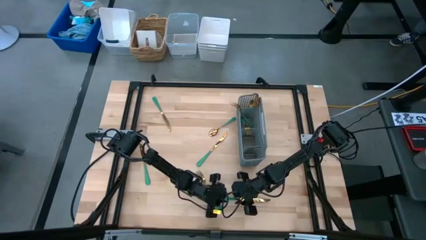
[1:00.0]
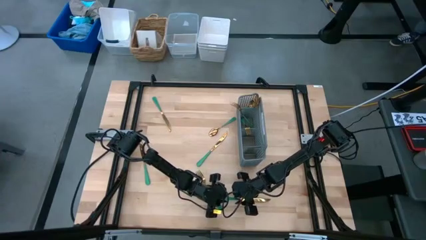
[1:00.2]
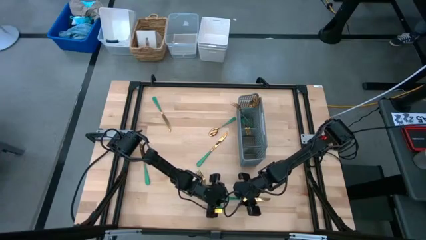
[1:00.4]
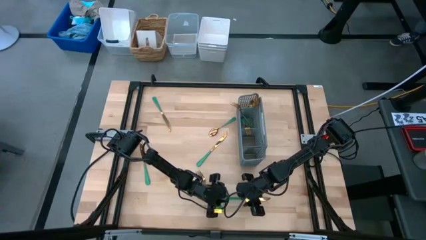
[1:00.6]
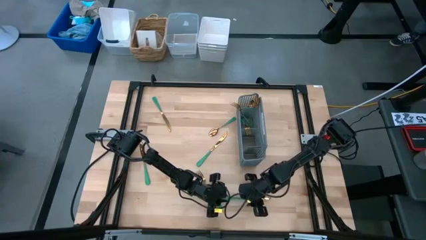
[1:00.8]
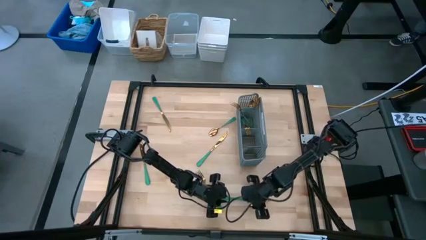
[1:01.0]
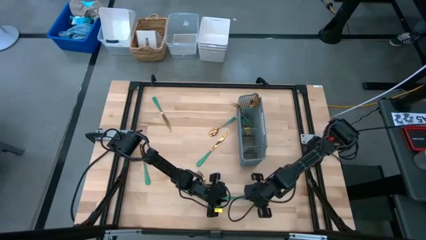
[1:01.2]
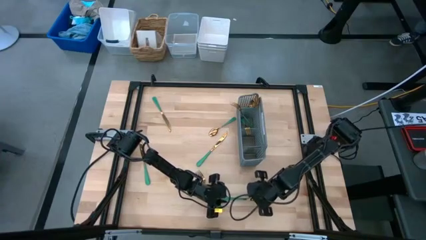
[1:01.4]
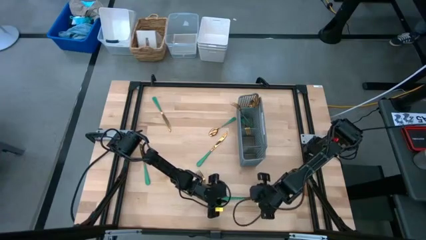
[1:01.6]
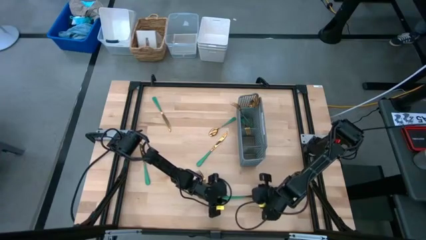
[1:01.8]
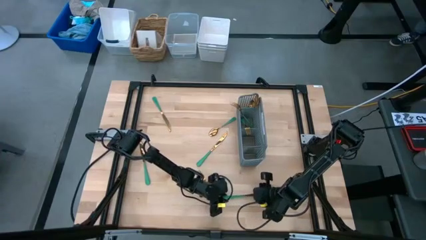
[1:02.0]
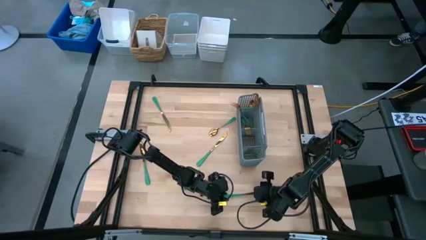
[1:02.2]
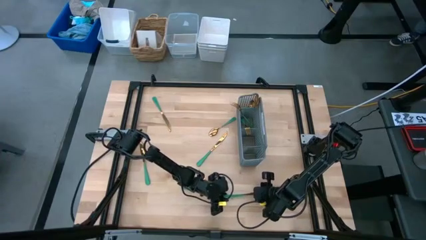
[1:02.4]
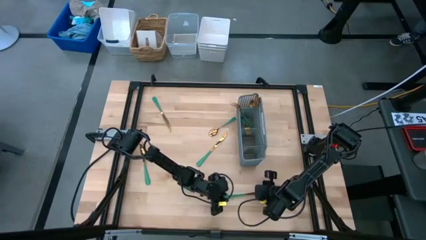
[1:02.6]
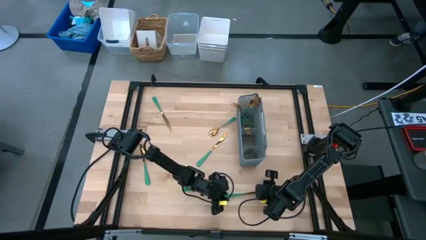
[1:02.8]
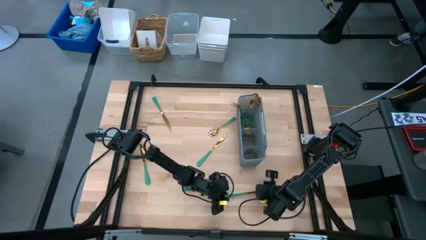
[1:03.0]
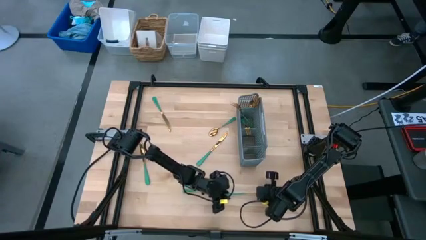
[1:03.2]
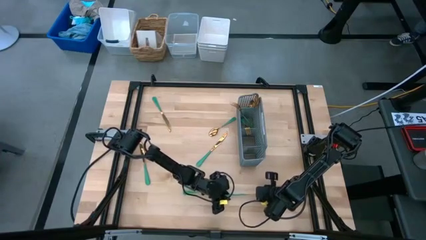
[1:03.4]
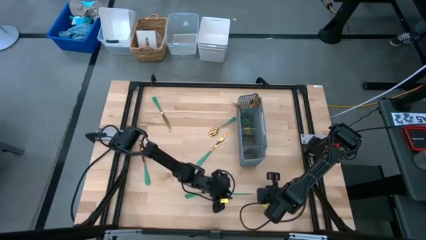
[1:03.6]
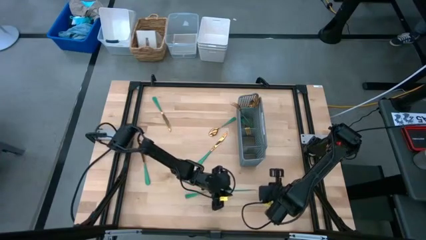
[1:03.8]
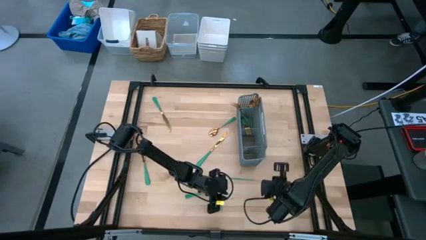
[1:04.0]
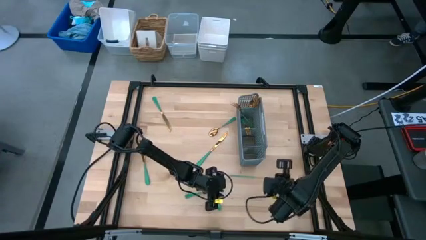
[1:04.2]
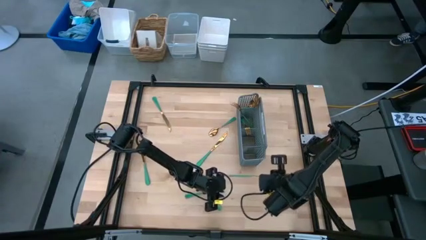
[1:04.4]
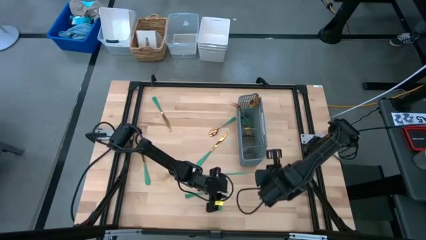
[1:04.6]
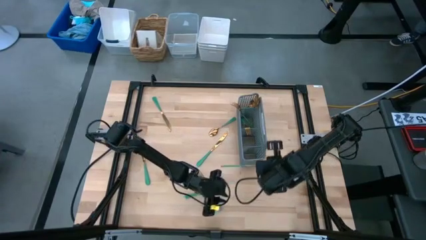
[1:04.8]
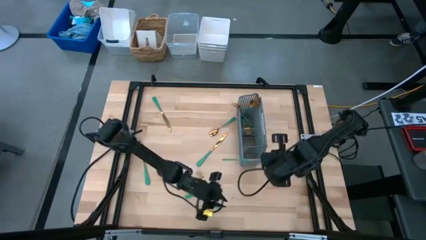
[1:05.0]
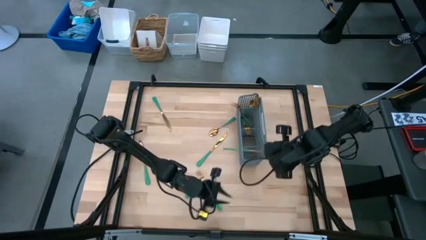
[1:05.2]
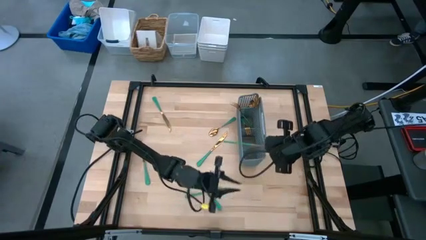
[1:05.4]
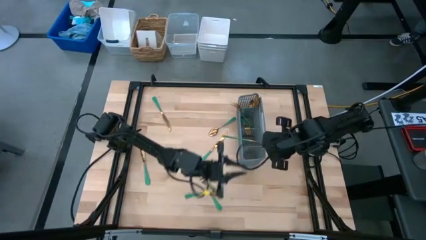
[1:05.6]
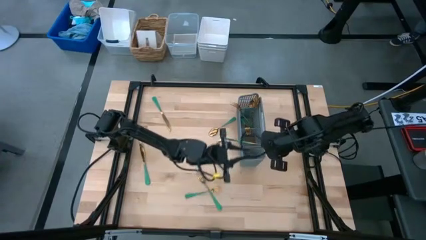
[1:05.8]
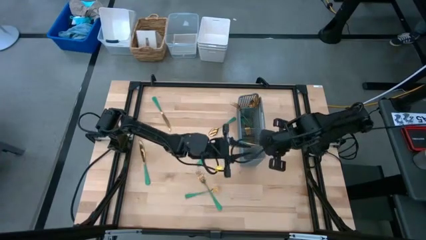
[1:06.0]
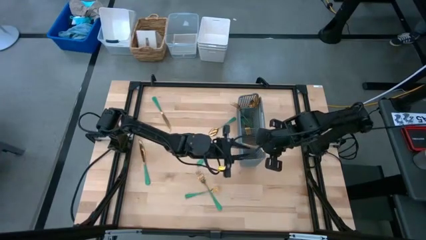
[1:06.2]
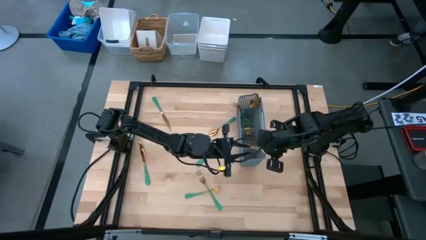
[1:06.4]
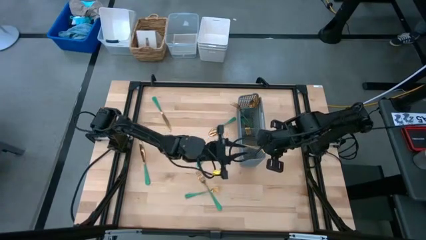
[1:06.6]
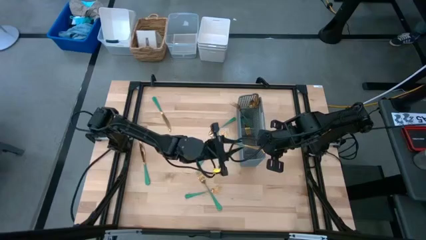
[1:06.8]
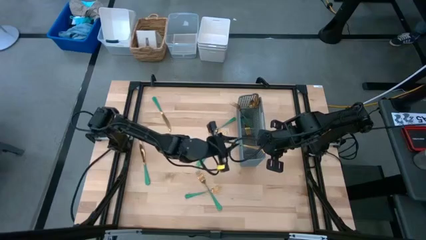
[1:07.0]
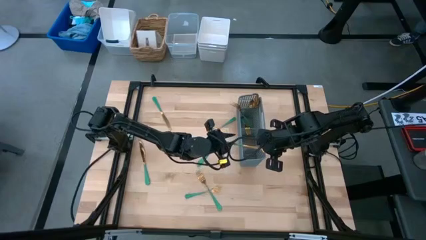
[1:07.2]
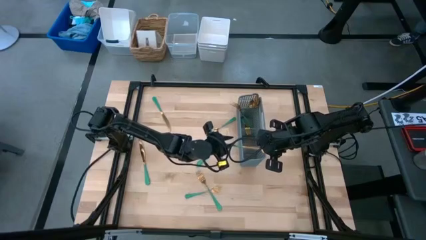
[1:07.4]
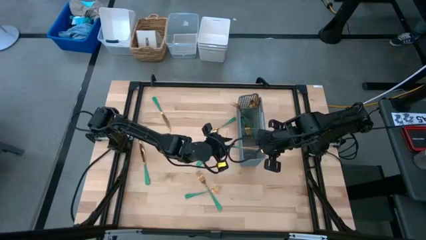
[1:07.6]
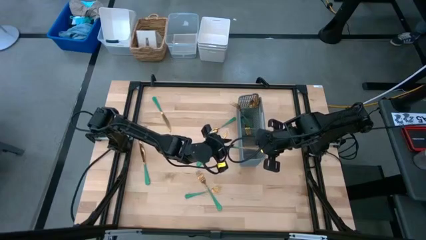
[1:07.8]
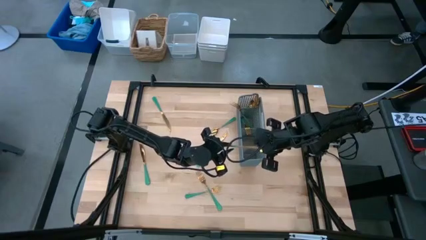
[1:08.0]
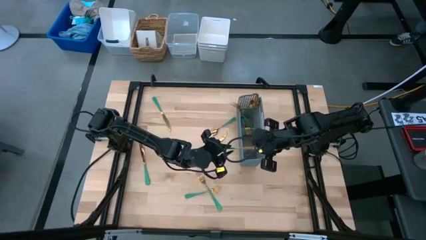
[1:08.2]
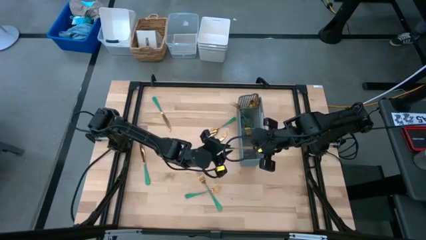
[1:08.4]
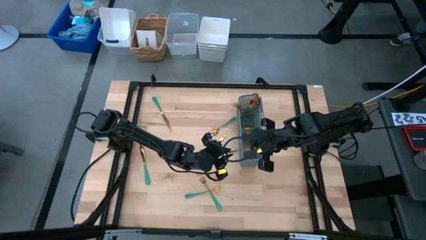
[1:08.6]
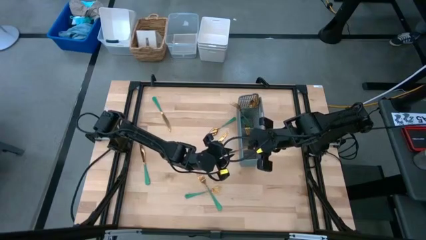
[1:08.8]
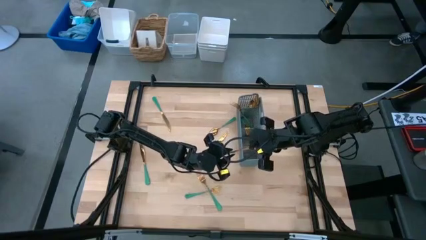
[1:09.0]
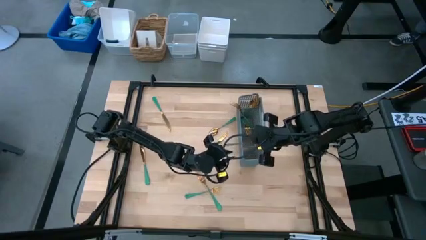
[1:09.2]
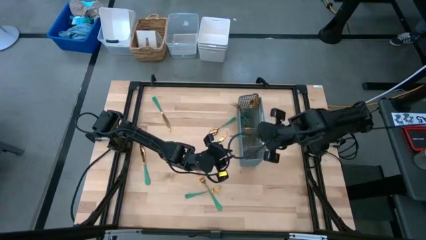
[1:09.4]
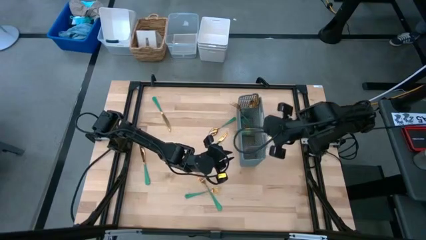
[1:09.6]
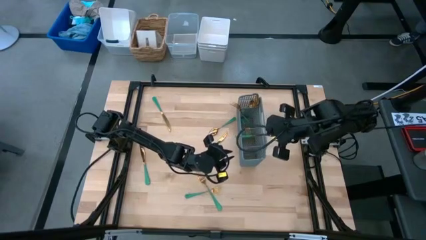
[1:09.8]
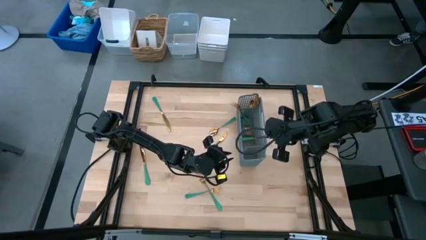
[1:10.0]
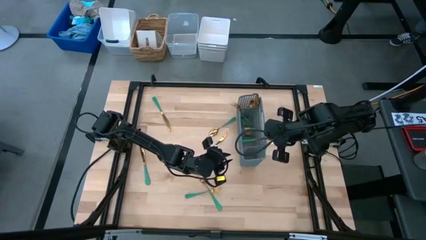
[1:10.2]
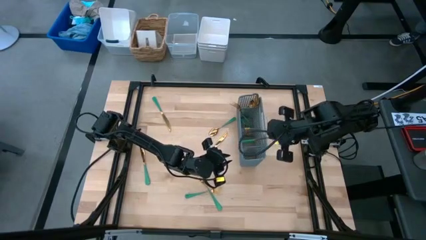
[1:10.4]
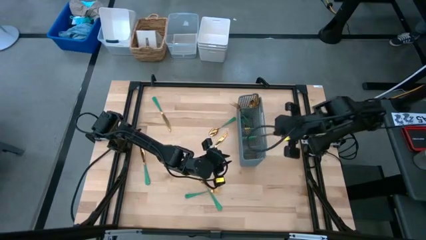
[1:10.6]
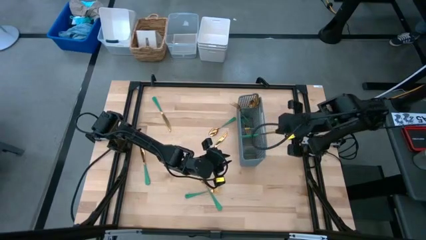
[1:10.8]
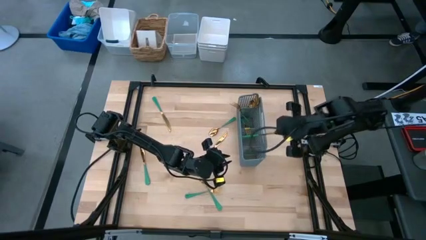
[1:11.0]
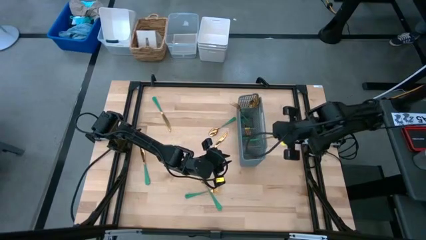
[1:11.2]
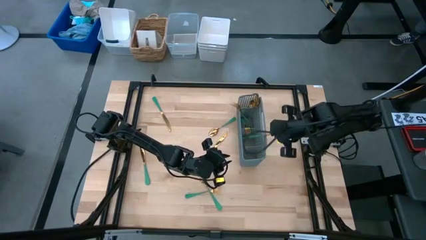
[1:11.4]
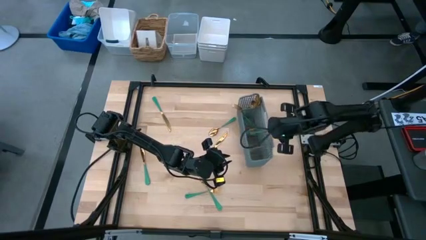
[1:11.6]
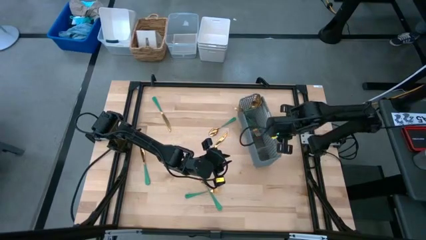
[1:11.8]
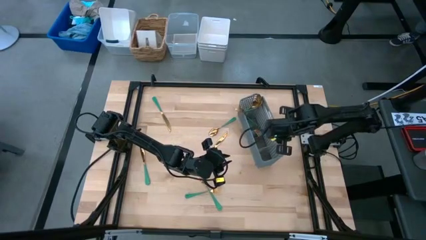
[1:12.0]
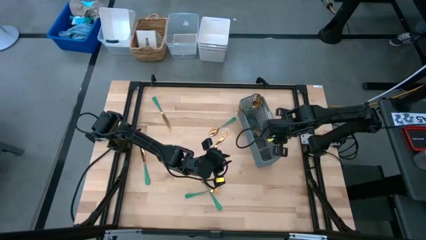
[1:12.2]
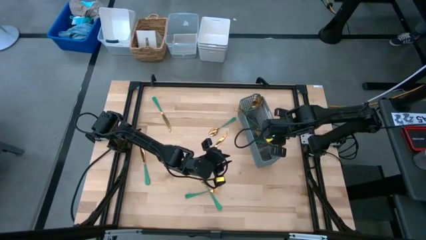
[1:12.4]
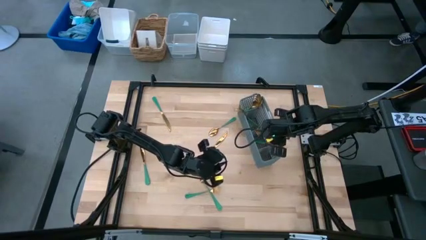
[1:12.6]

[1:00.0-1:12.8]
Task: Sort silverware
Put the bottom right knife into the bottom section of the basket

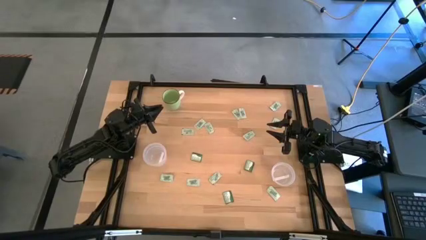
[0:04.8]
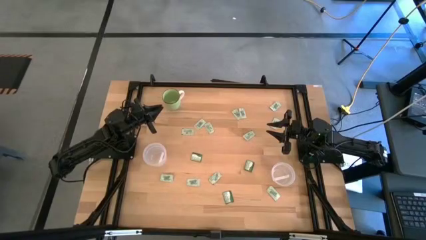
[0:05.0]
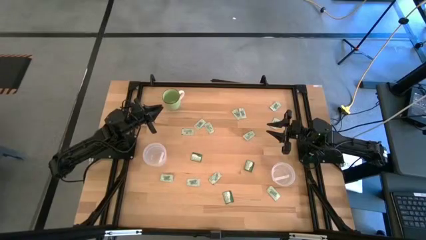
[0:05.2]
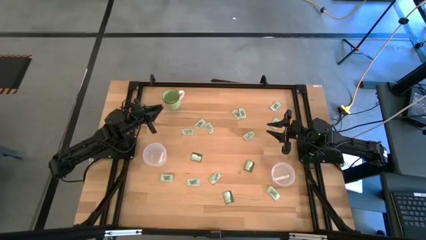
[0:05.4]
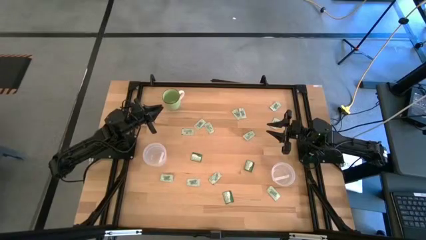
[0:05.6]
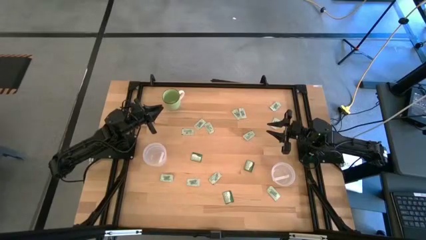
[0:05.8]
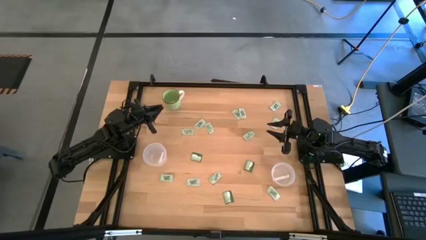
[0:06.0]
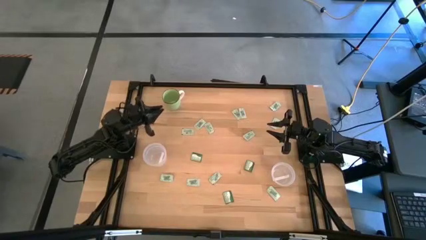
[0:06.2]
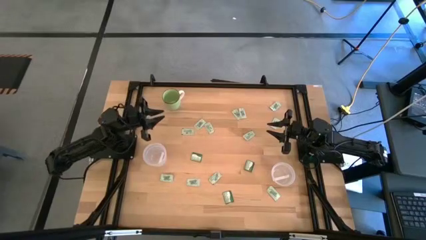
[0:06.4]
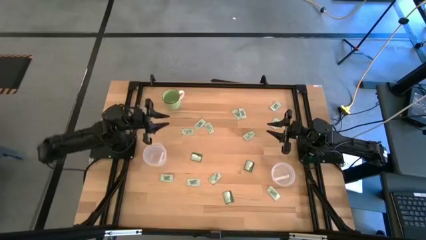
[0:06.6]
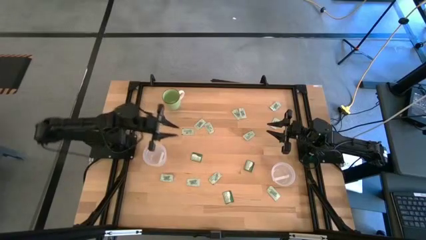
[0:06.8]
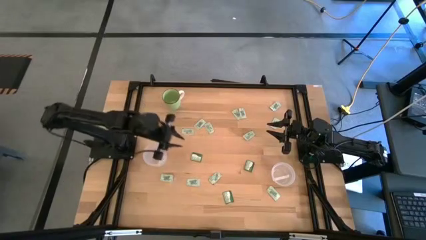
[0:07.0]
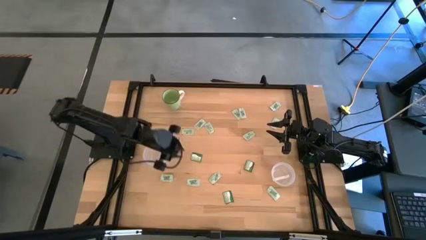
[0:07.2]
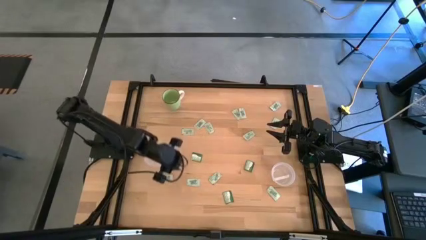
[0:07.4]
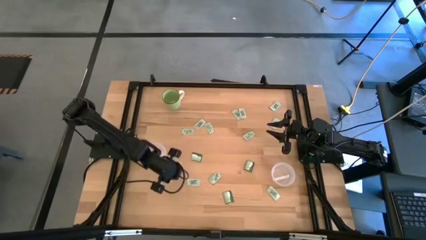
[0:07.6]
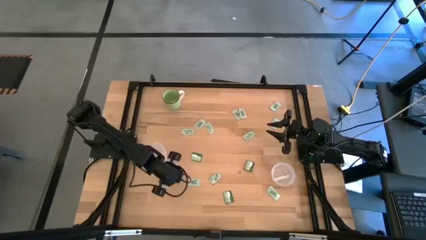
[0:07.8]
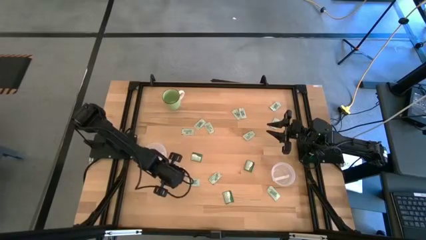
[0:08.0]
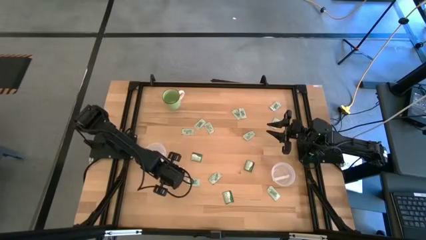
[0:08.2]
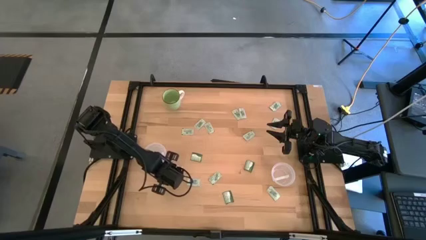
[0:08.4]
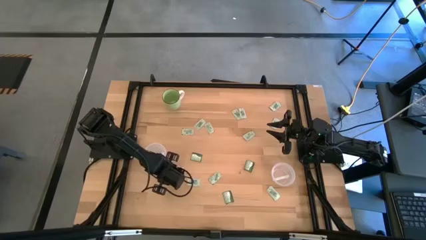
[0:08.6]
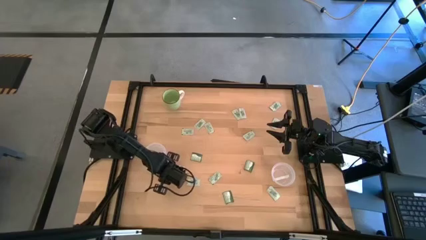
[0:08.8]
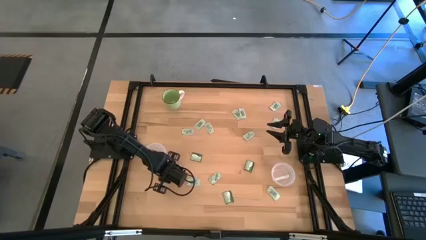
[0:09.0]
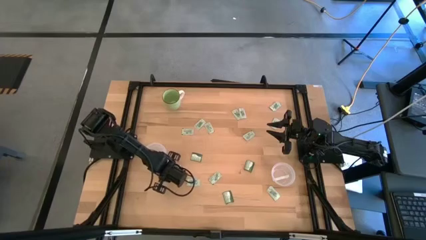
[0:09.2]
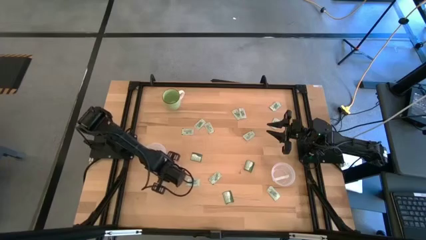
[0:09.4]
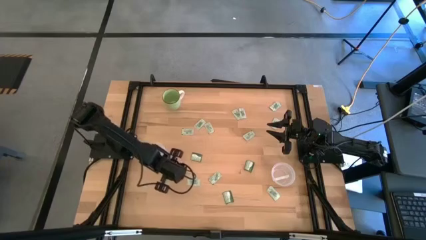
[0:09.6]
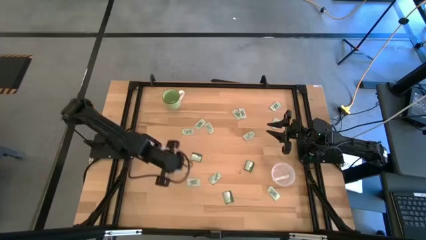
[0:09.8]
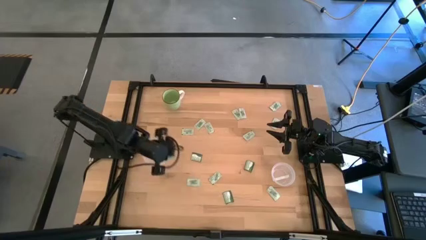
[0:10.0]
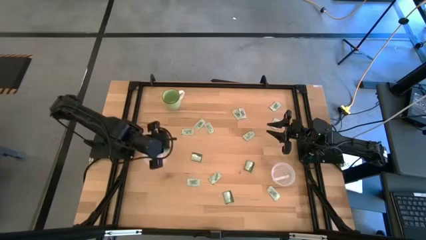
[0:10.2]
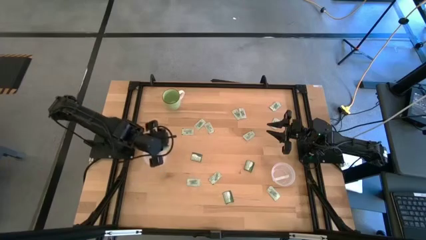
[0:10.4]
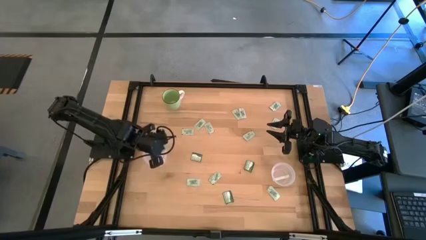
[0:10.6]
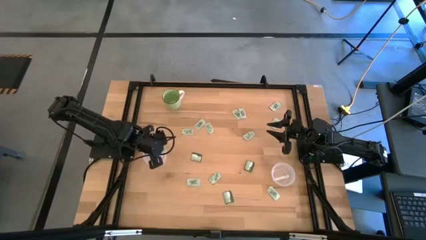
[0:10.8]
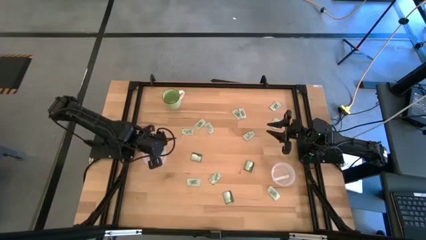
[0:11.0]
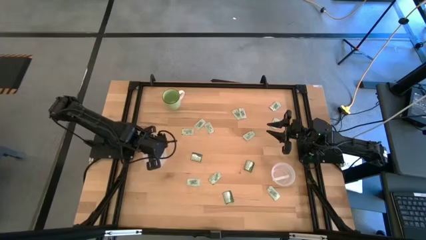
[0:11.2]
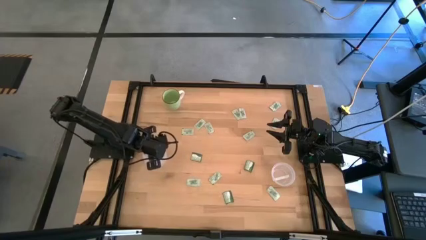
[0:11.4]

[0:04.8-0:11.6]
Task: Pick and place items into bin
Put the stevia packet into the left transparent bin
